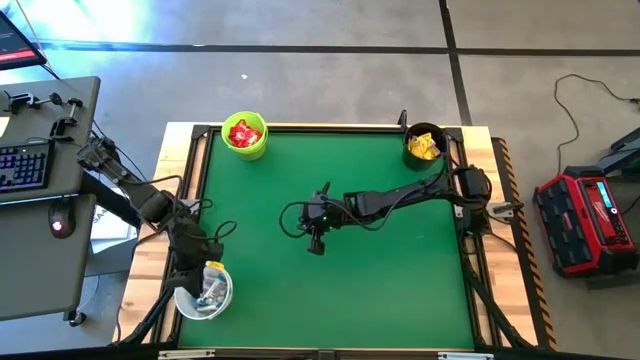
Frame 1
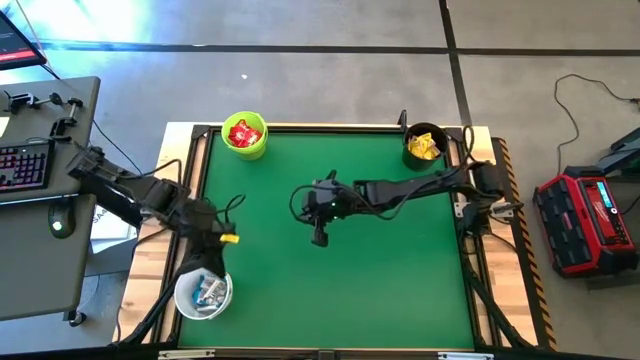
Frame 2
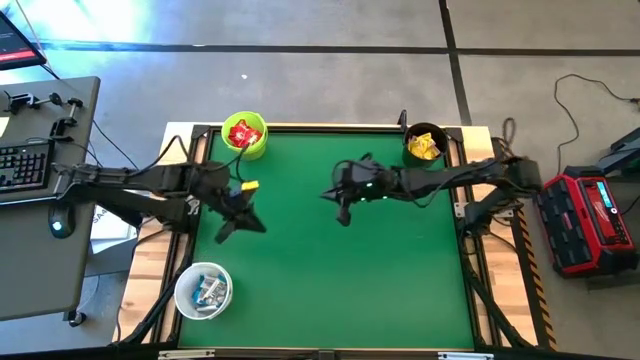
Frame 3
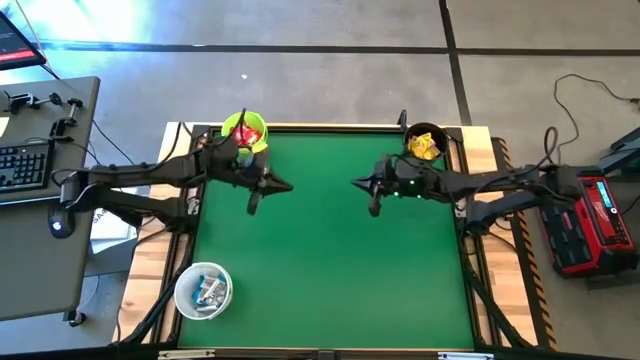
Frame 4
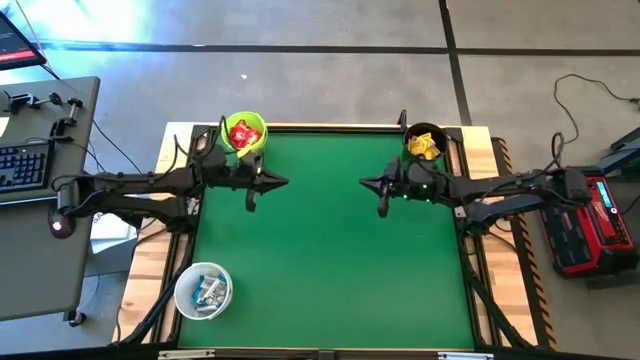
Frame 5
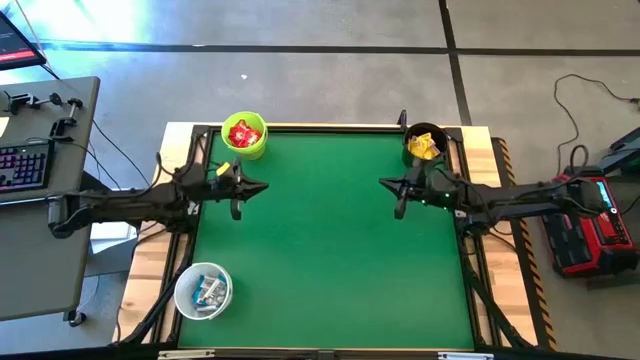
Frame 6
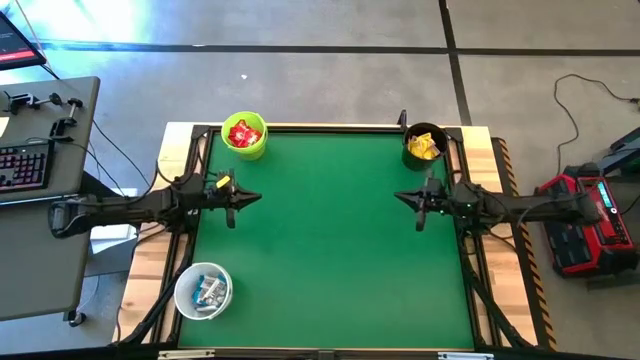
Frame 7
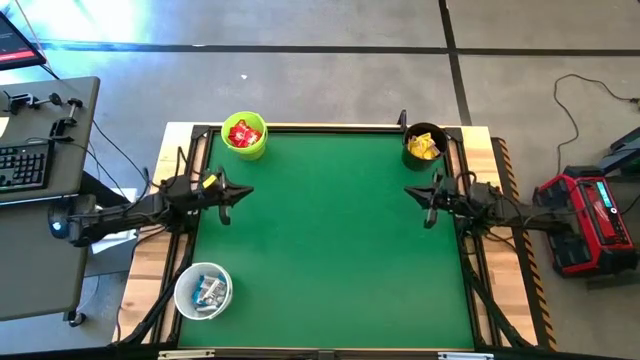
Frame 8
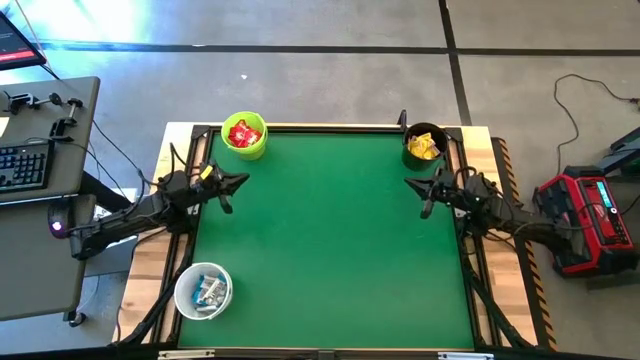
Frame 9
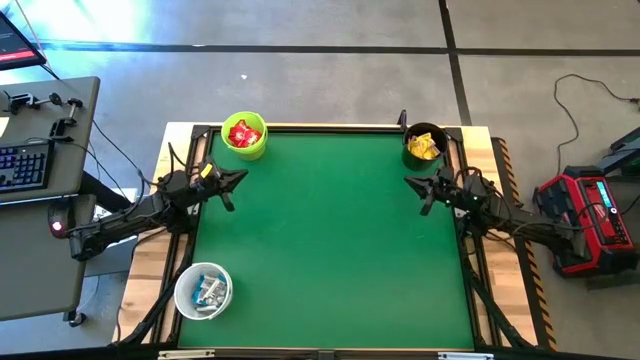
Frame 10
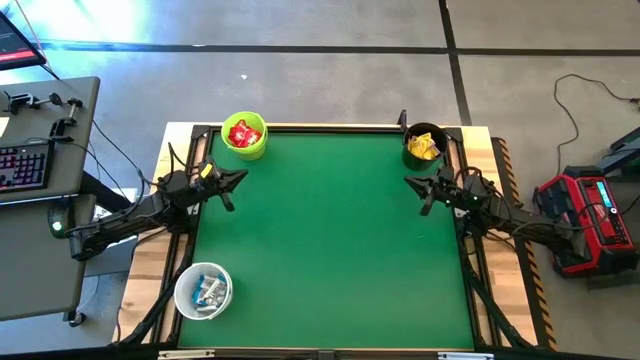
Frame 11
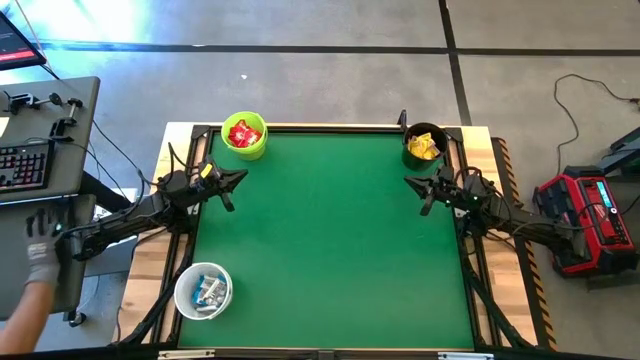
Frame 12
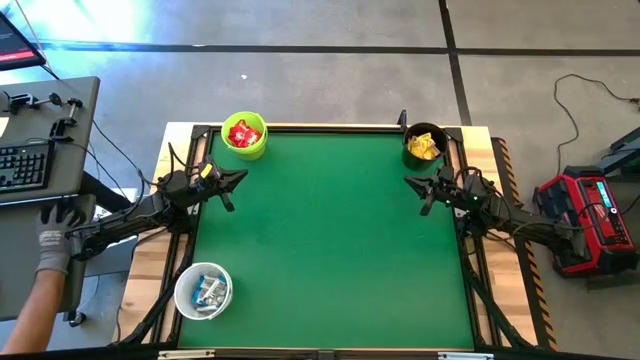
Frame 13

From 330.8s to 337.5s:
Task: Sort candy by brand, put in halloween buckets
Return to Home Position

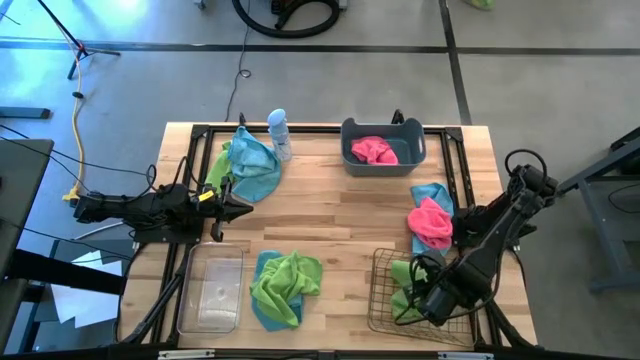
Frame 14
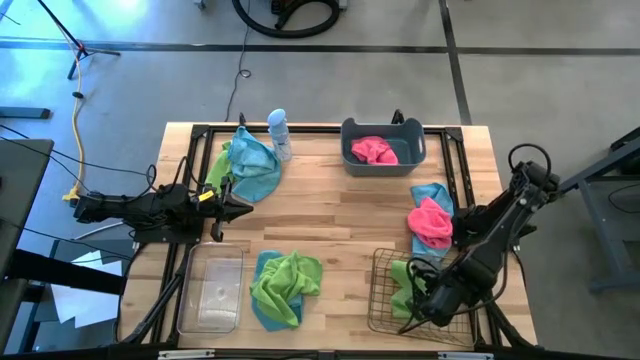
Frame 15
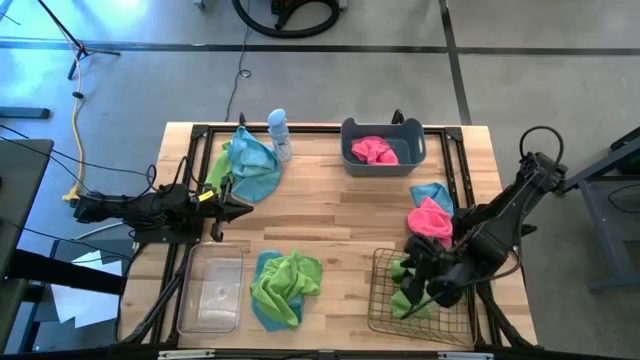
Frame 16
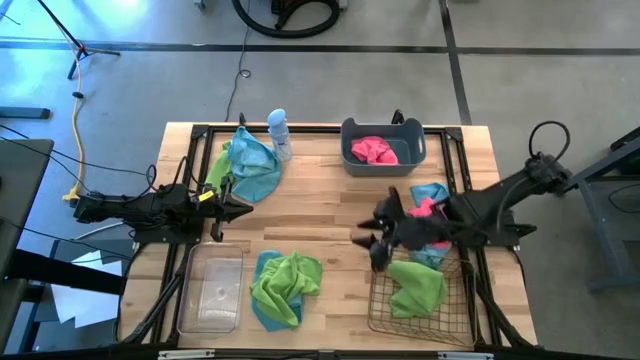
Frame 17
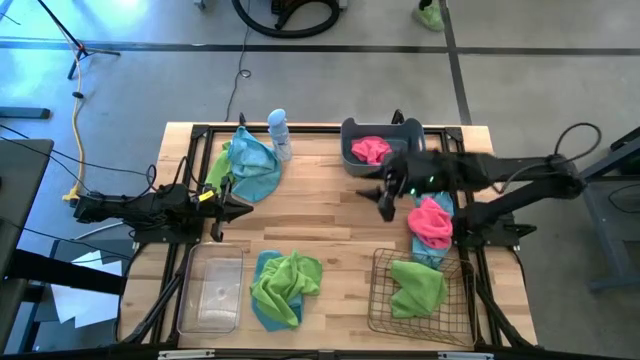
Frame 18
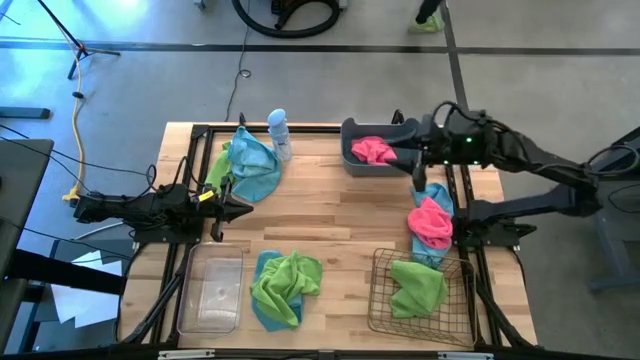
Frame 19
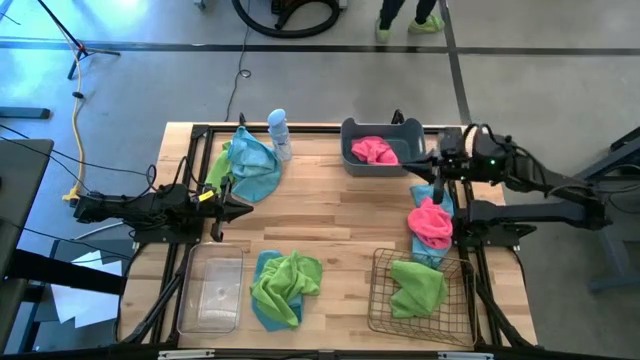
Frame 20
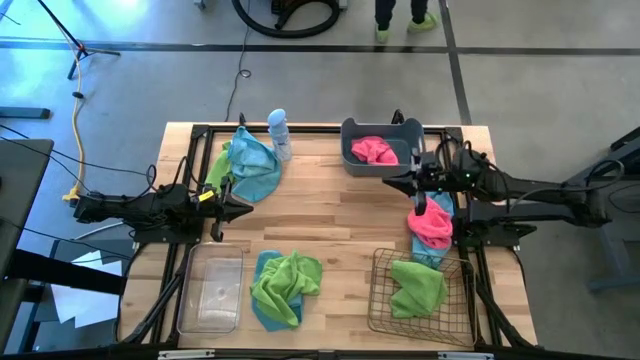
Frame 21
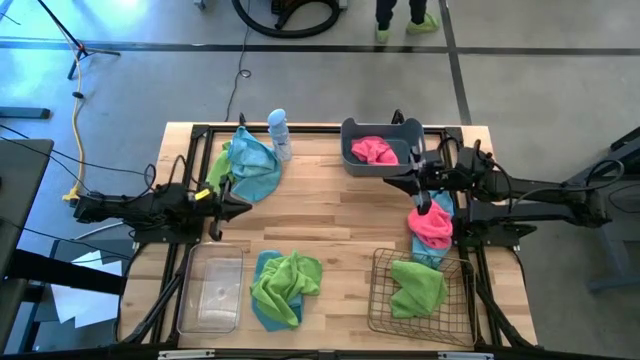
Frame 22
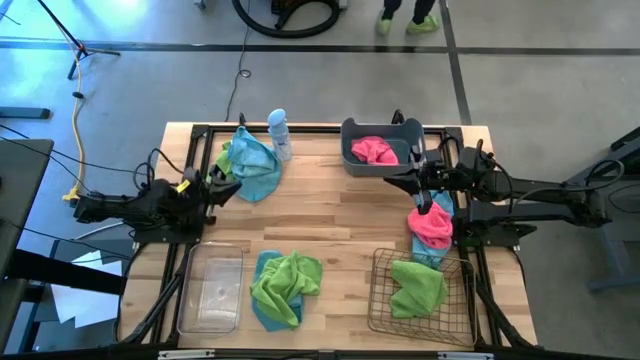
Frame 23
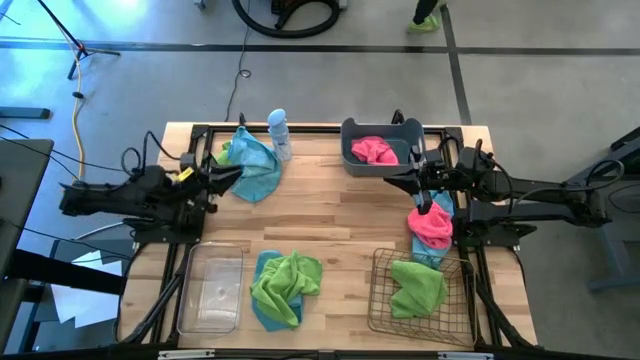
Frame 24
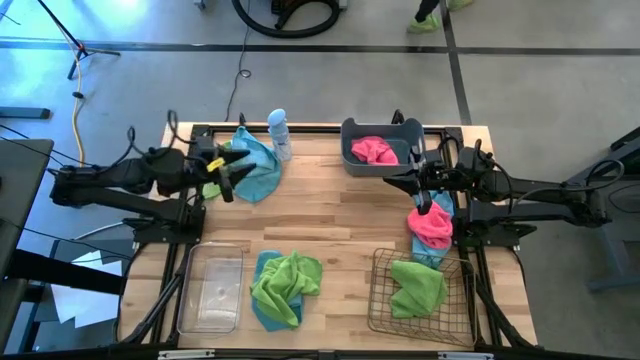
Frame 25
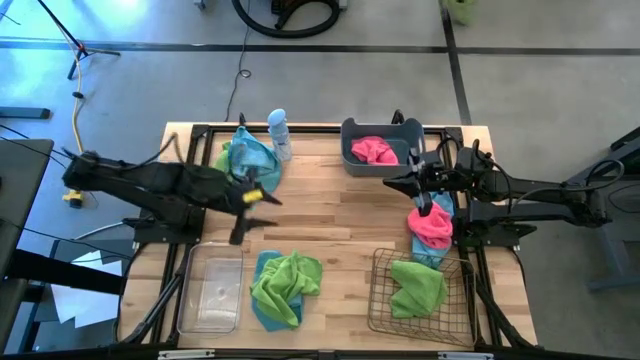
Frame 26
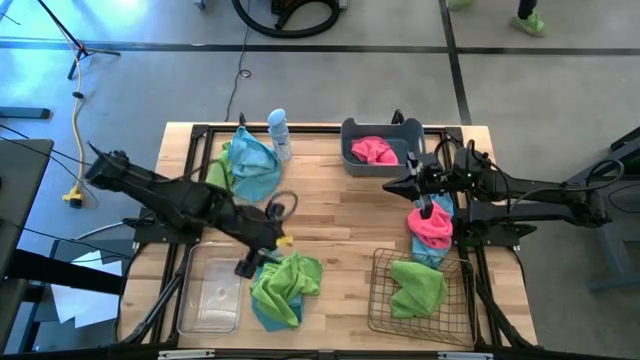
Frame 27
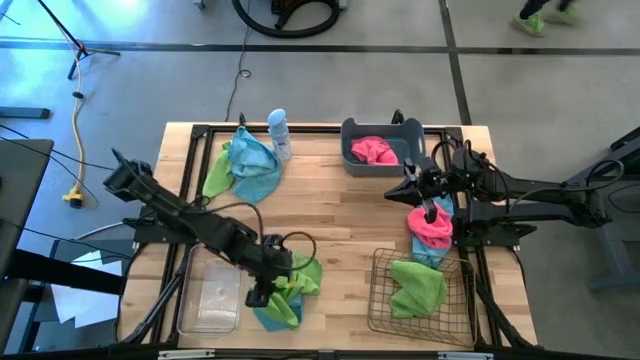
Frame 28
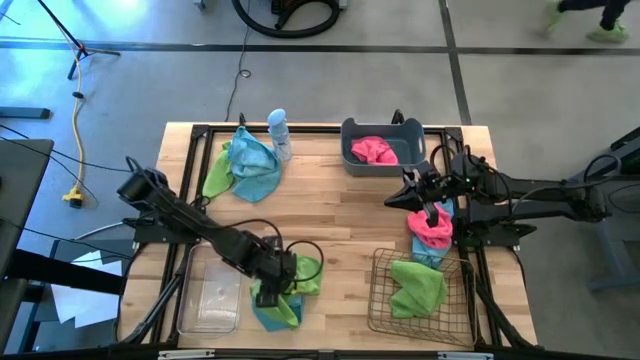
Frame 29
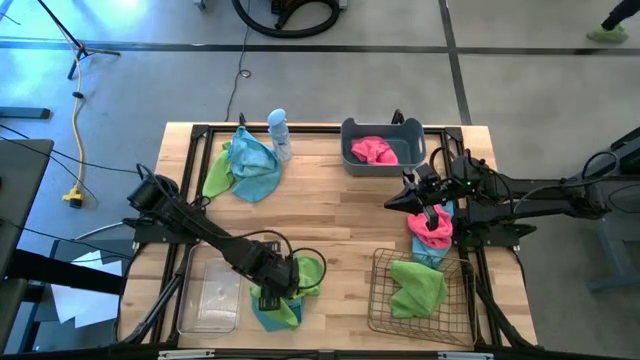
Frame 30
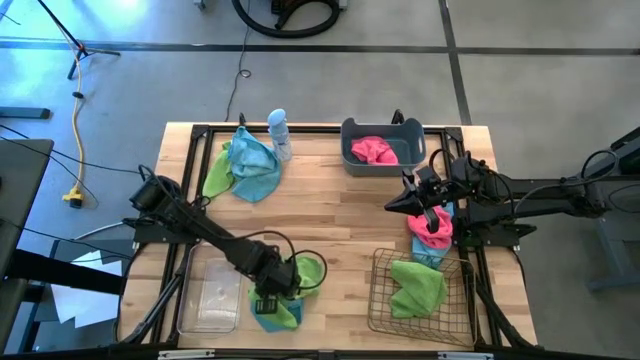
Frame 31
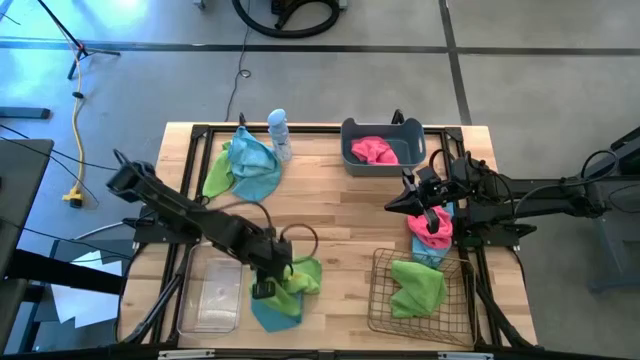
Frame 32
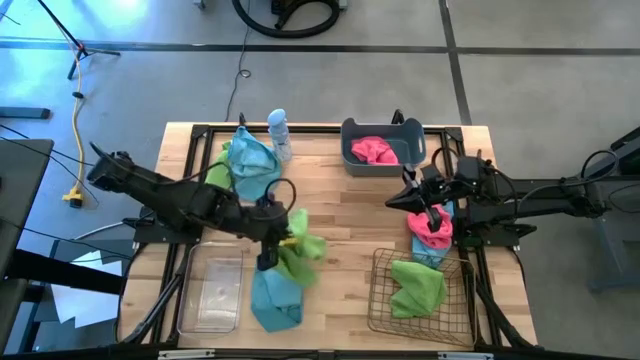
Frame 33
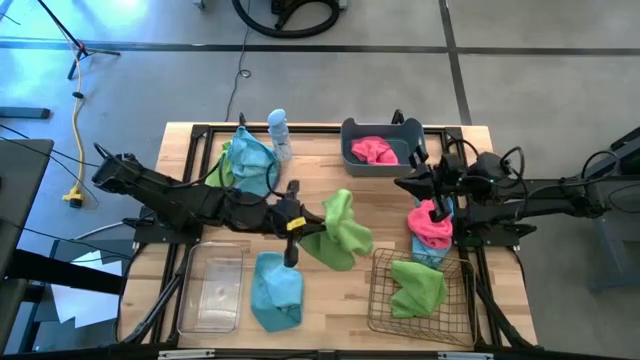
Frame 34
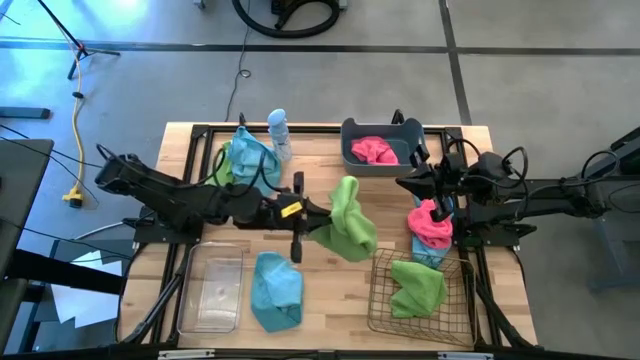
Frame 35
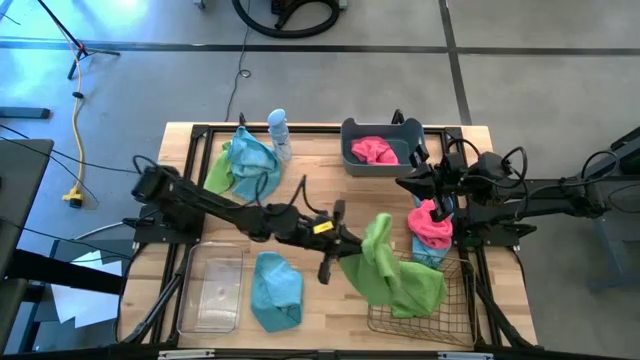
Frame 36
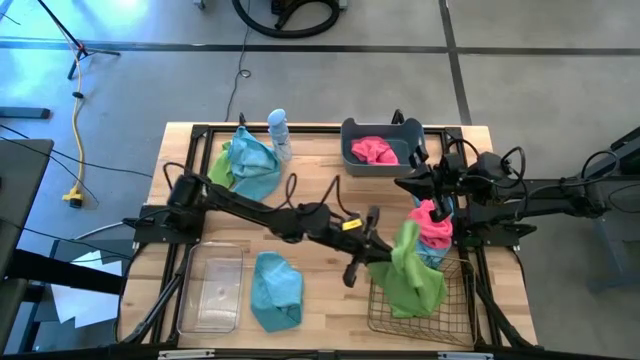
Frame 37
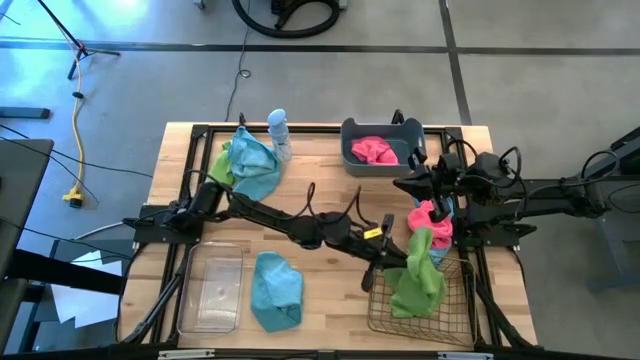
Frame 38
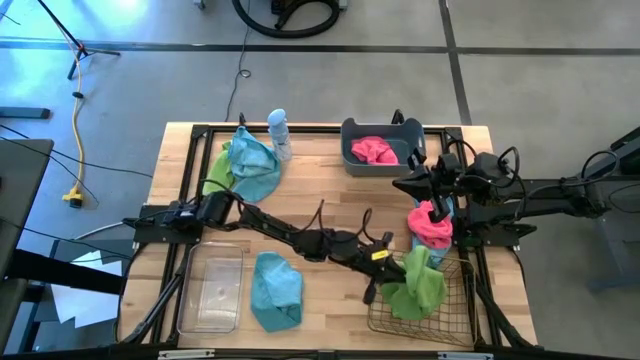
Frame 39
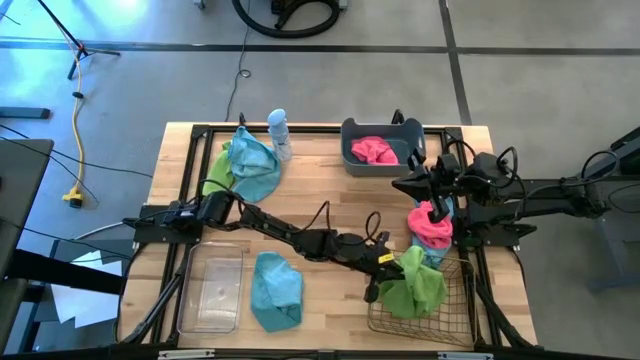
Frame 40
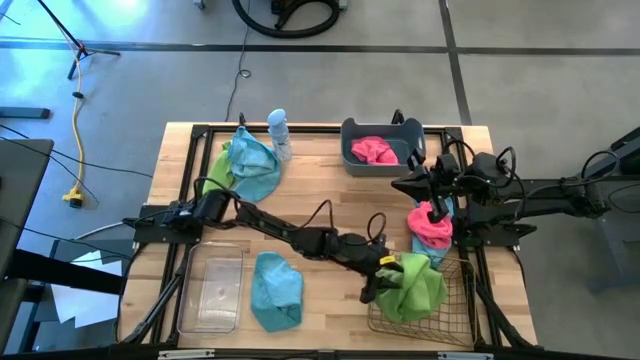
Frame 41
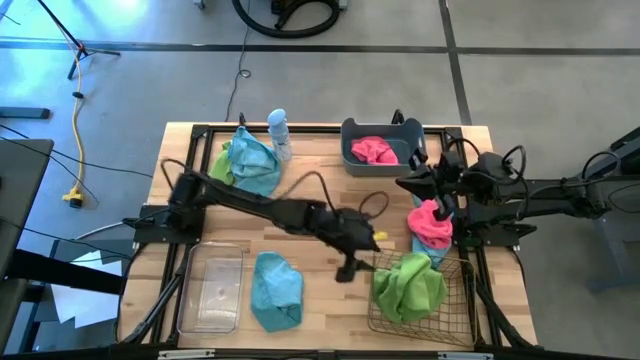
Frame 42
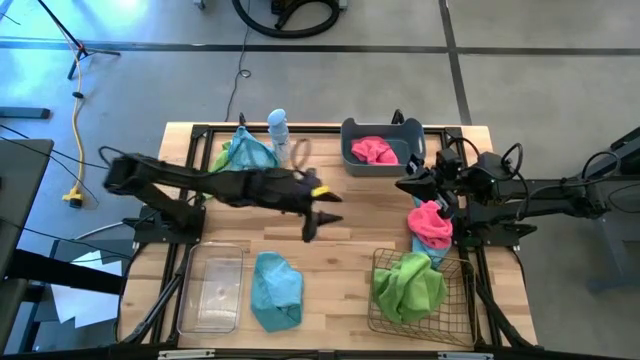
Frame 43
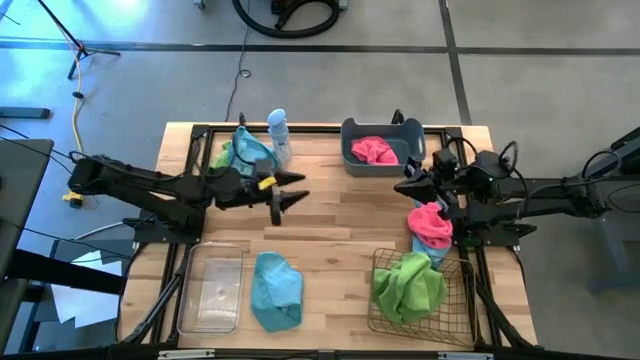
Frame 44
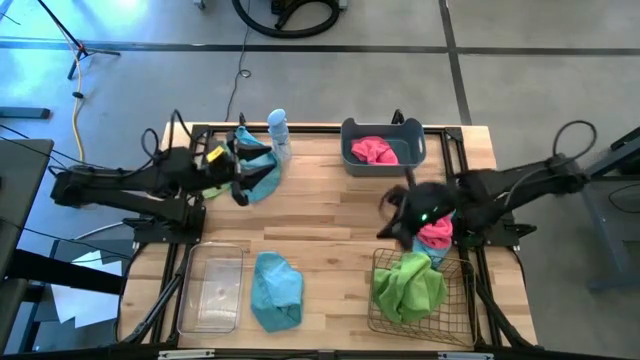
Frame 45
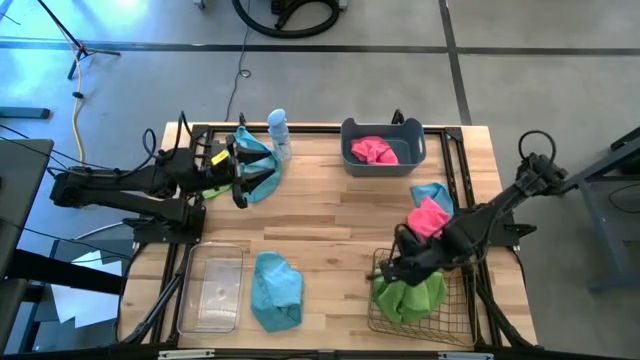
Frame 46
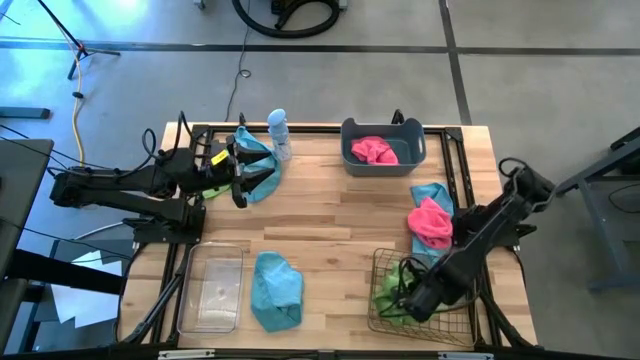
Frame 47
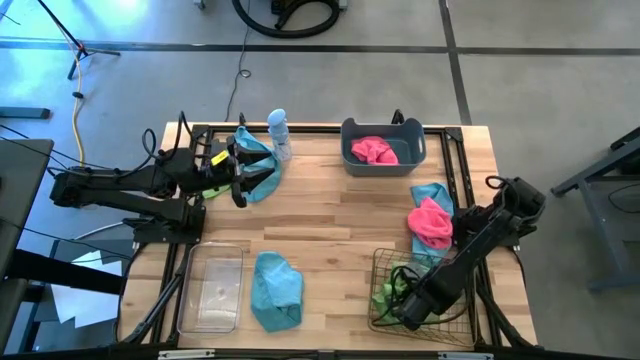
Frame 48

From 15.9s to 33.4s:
Task: Sort microfiber towel by color & place in baskets
Put the bottom green microfiber towel into the wire basket
